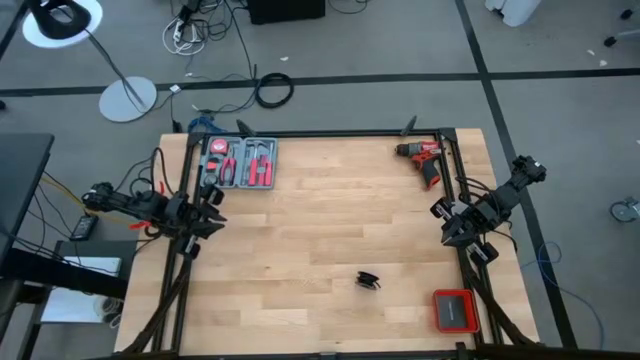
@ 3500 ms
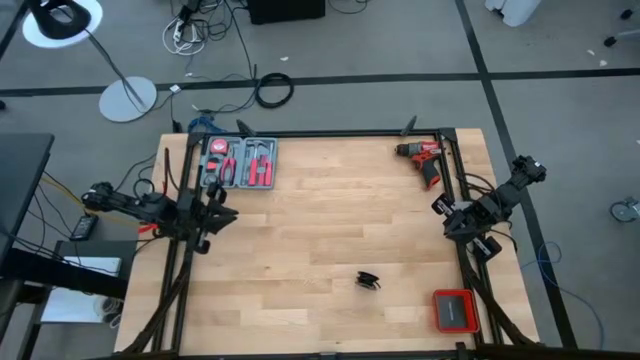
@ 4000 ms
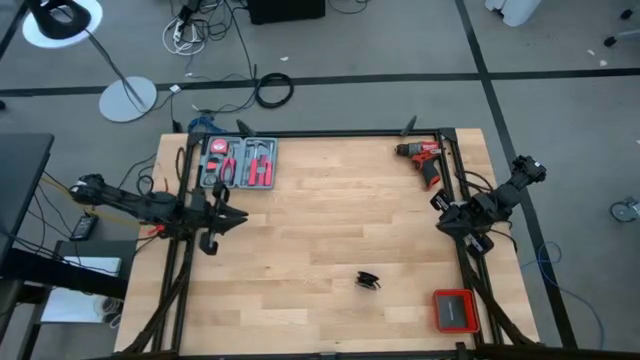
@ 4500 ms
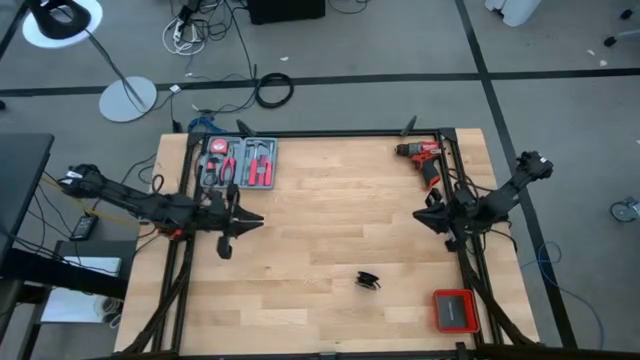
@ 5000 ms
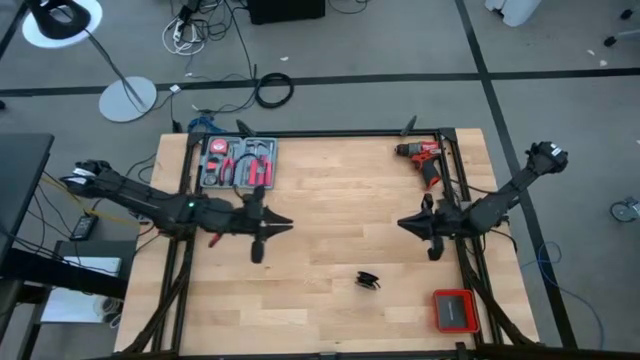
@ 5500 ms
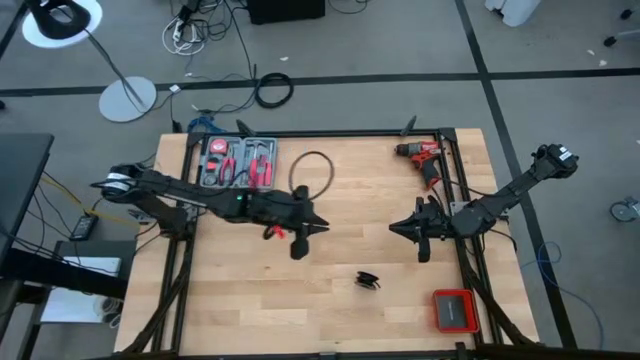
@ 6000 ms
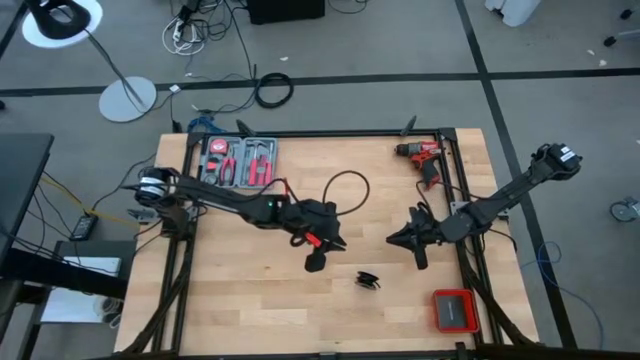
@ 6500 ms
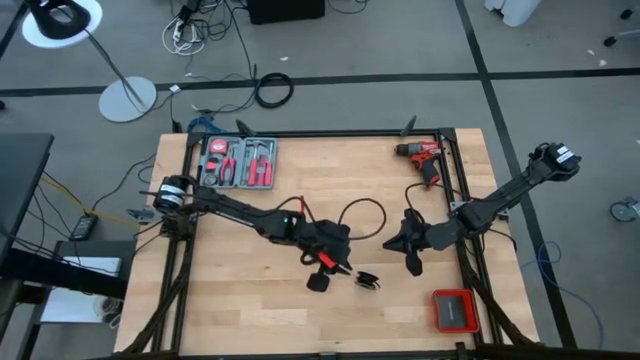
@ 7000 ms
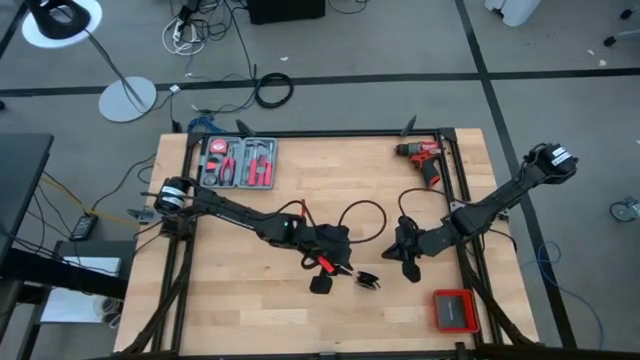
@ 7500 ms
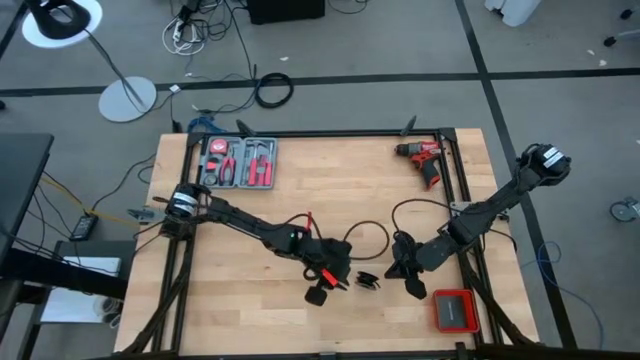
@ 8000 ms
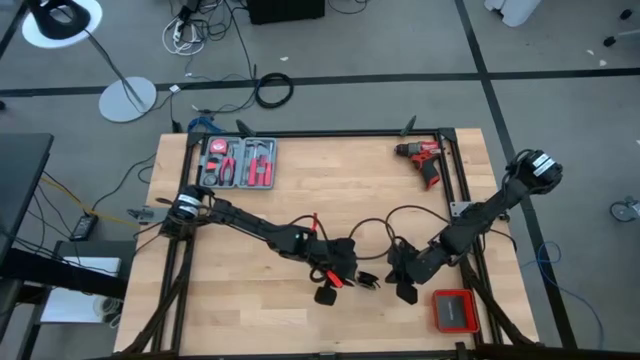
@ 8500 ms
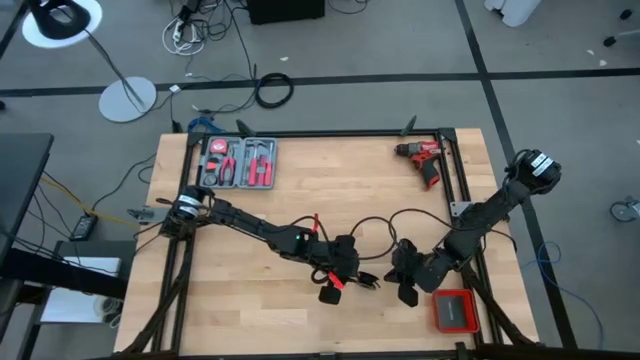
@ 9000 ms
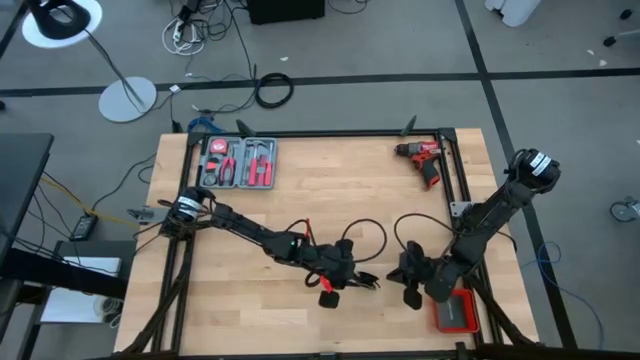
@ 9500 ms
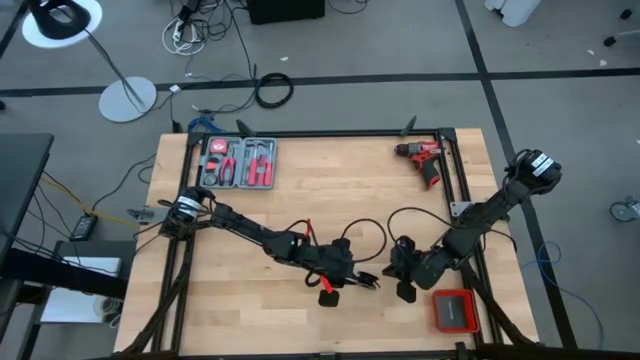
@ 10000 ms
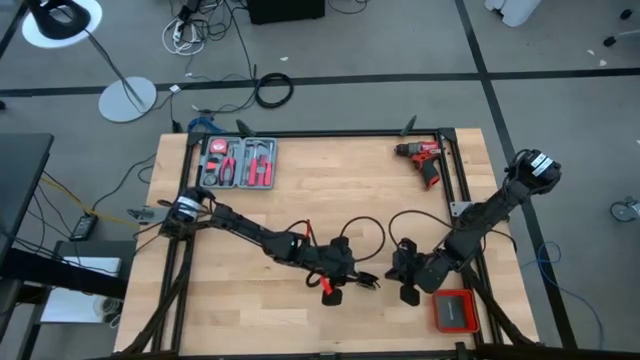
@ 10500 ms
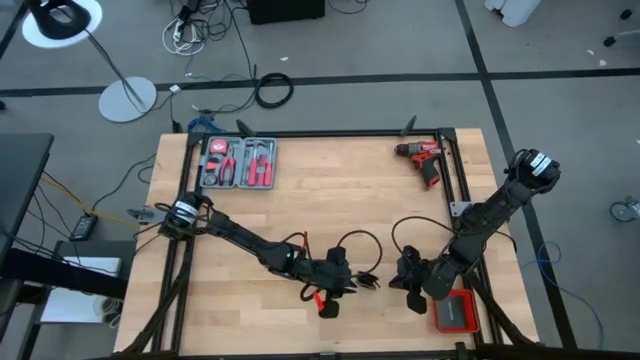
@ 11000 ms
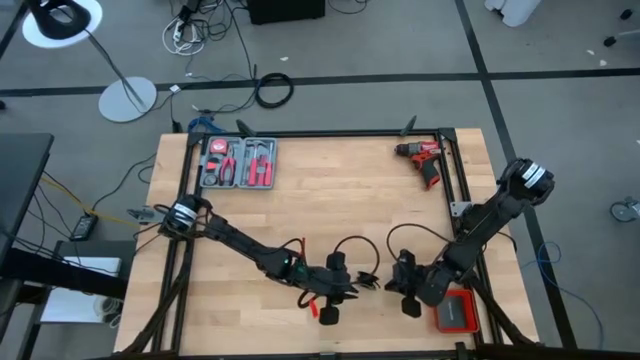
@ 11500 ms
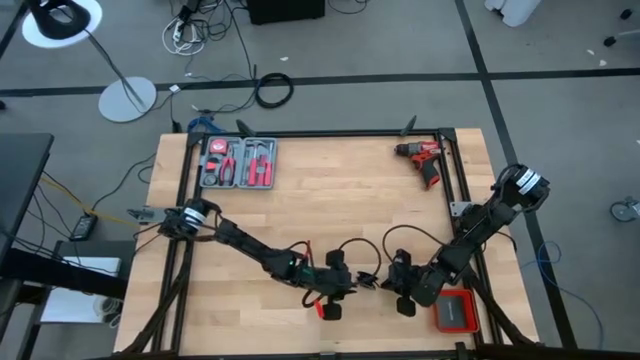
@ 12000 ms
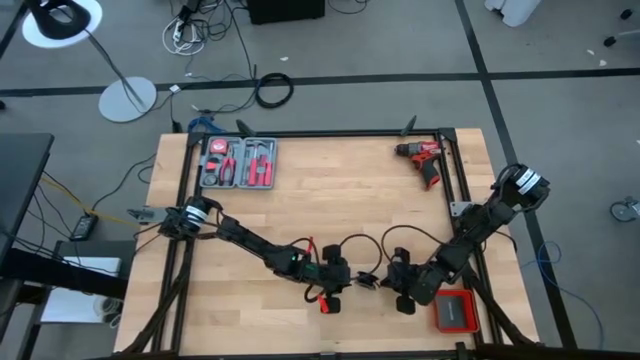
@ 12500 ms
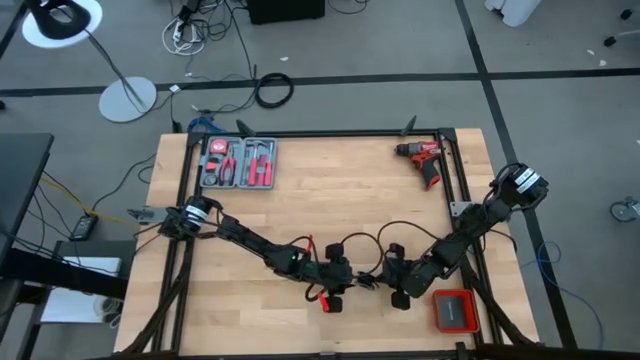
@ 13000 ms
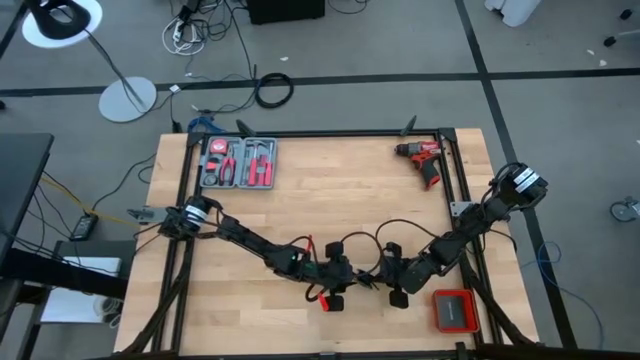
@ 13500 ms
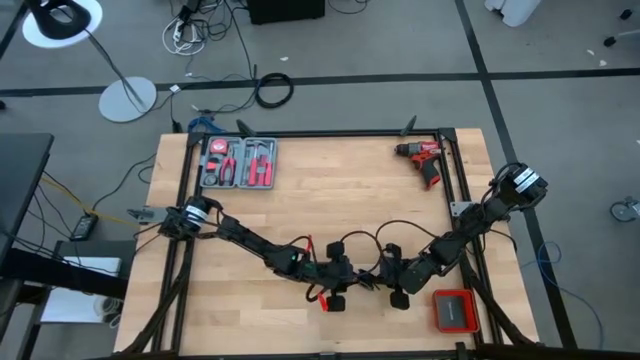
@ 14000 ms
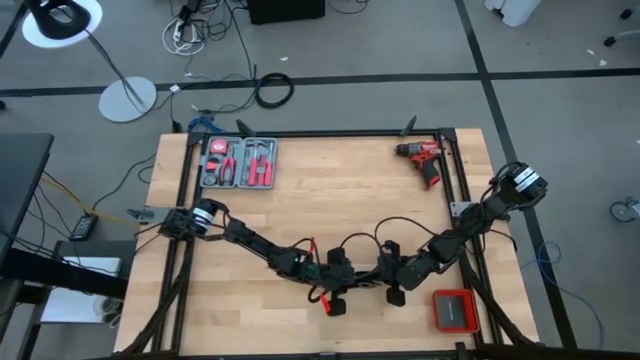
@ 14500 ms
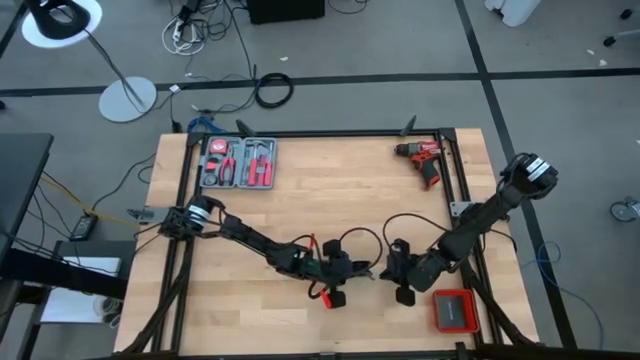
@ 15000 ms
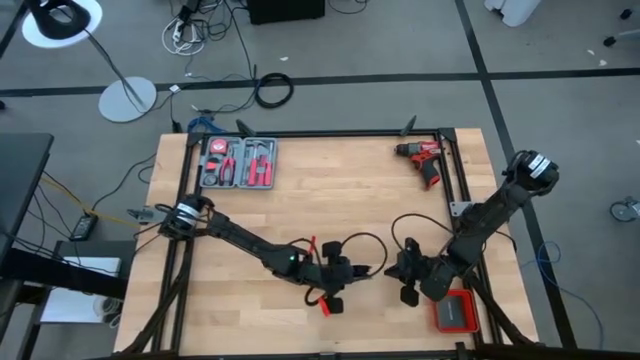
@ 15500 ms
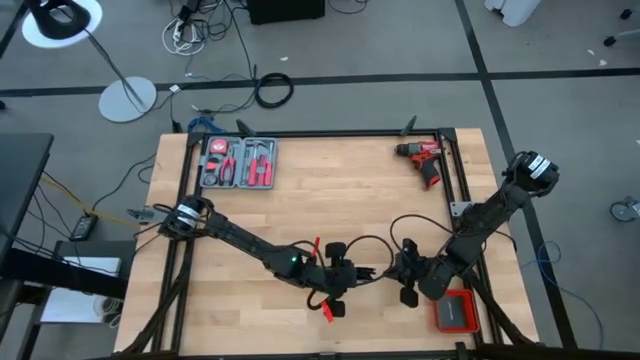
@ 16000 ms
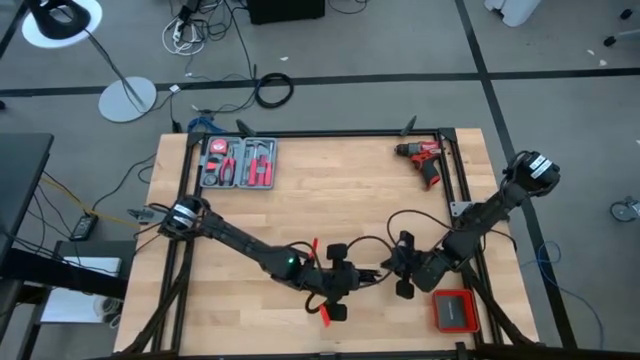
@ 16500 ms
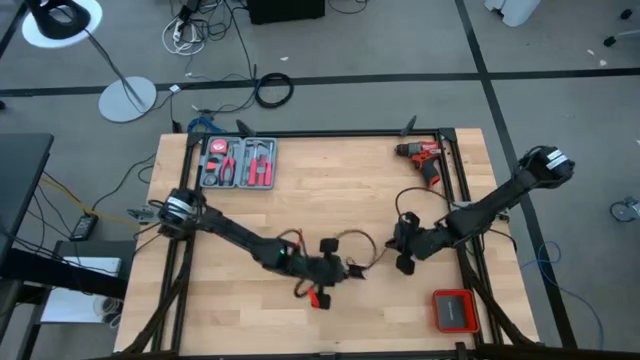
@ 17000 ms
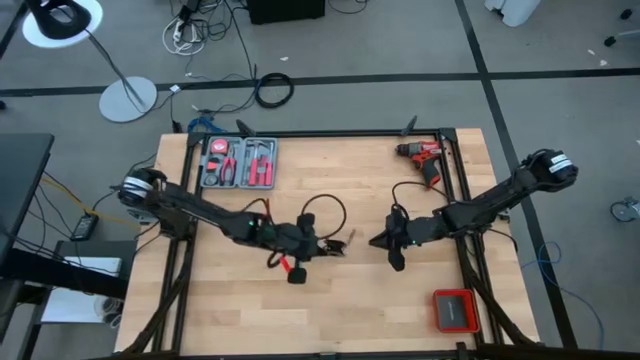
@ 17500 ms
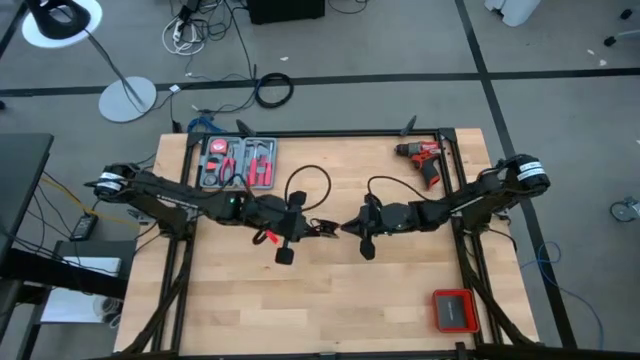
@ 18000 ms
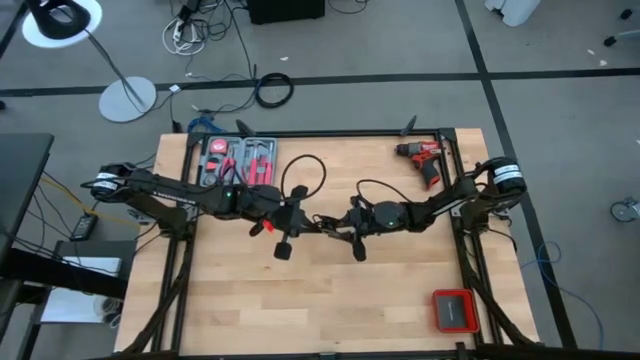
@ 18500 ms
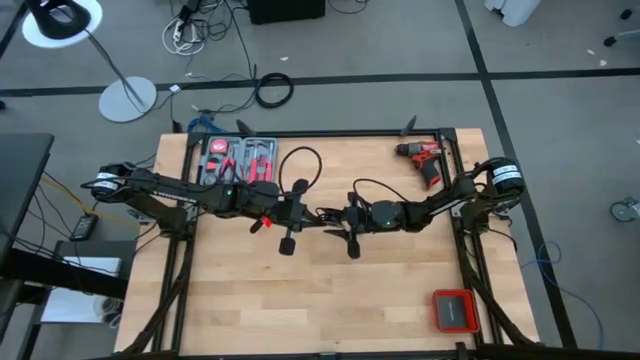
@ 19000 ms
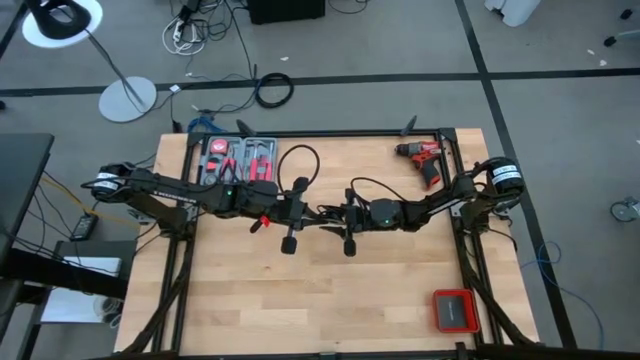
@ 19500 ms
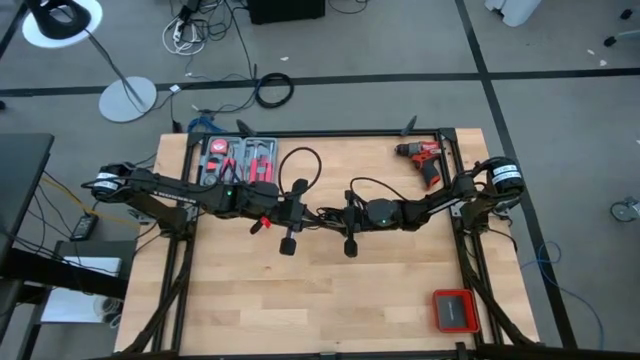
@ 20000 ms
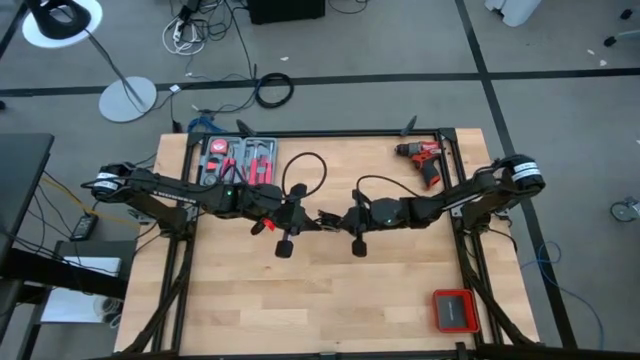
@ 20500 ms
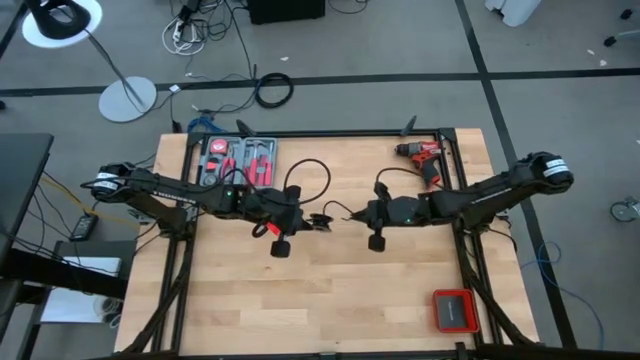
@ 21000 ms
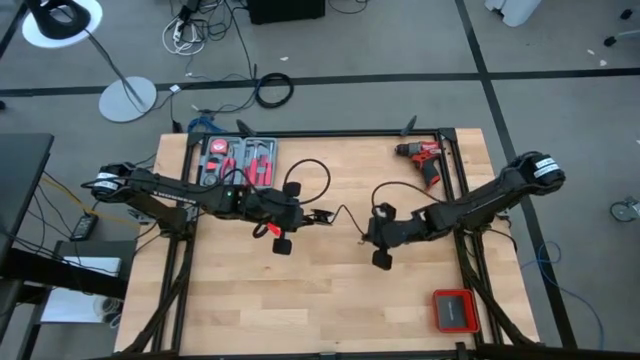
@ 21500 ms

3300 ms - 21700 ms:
Task: Coil cords
Uncoil the black wire from the black spool

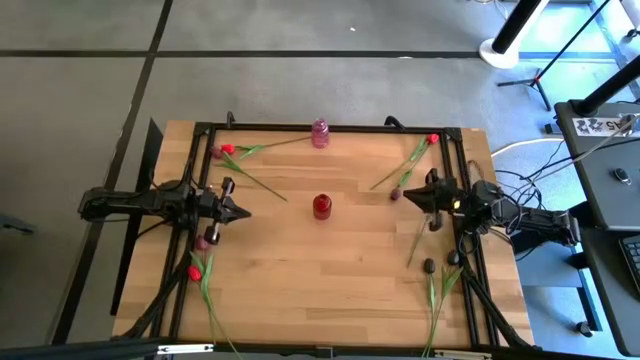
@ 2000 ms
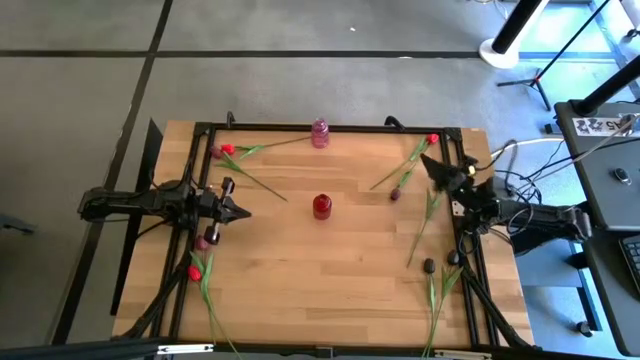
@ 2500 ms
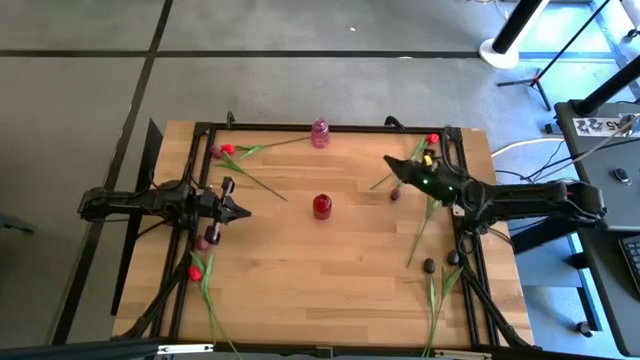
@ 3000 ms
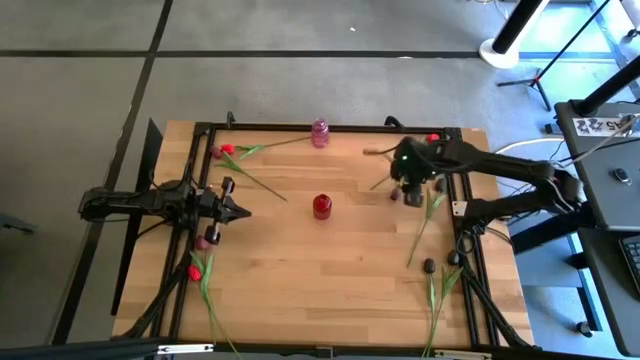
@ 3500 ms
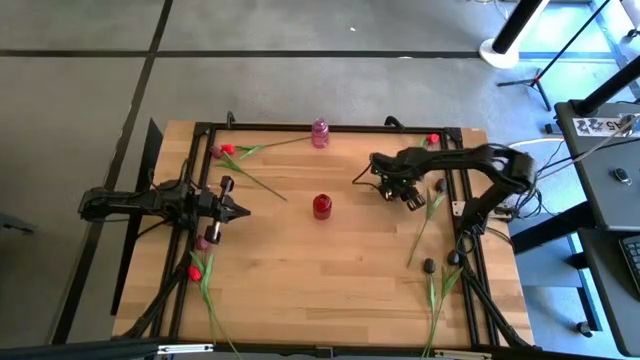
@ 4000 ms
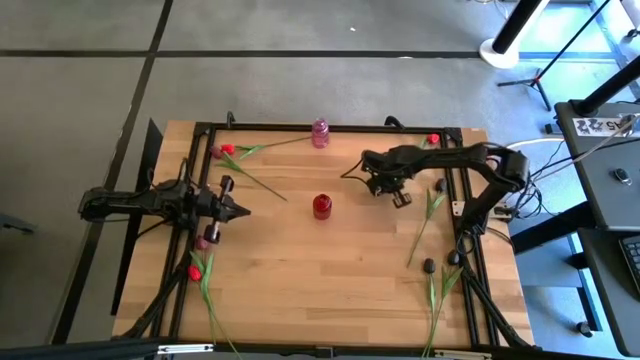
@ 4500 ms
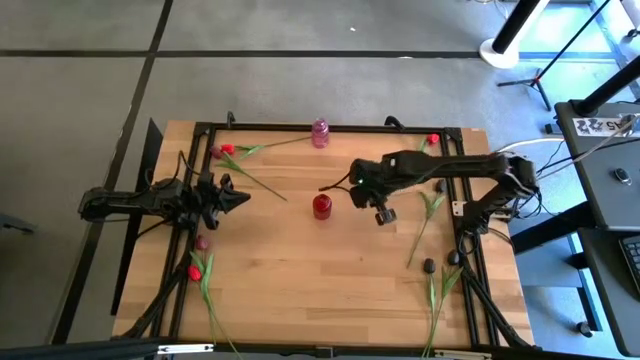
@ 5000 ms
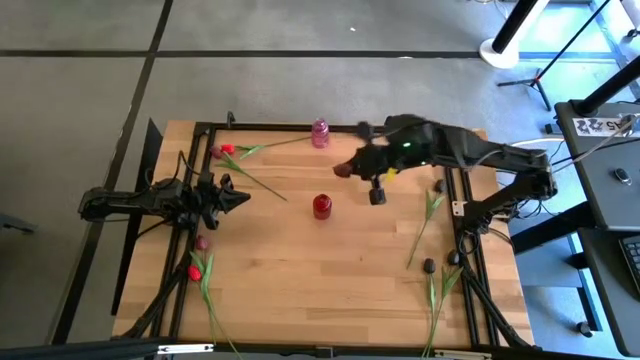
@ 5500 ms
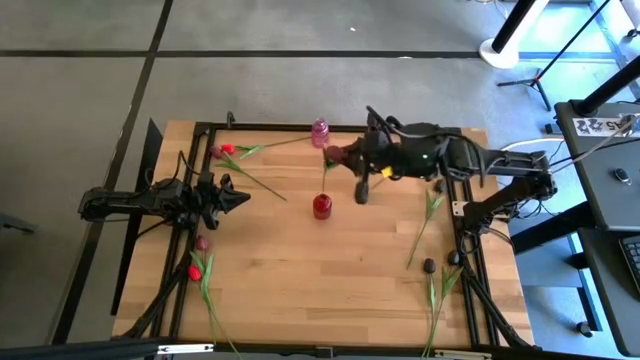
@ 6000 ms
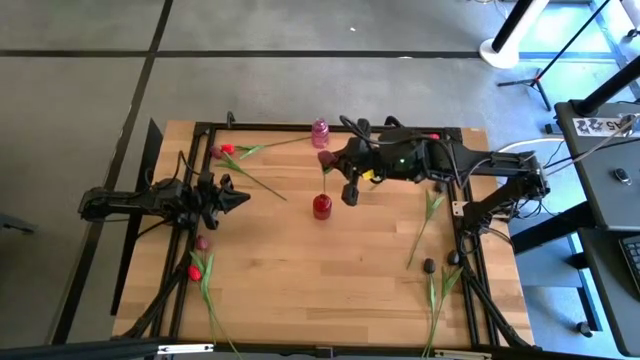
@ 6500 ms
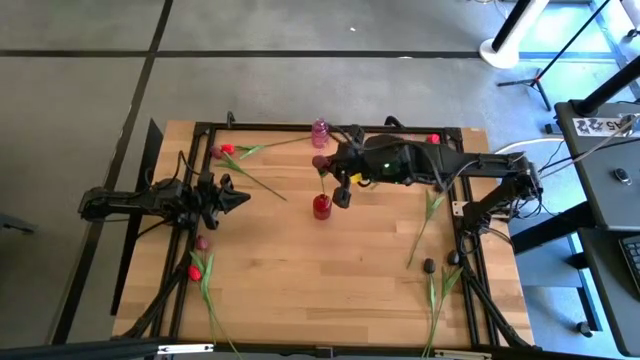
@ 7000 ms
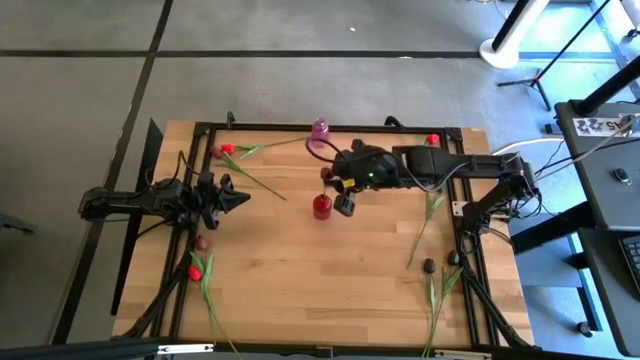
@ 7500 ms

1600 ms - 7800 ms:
Task: Sort flowers into vase by color
Put the top right dark red flower into the red vase
